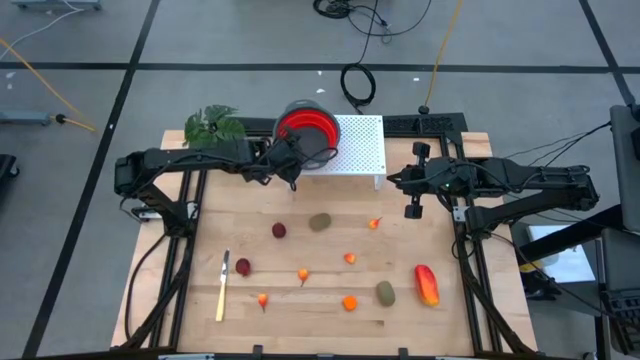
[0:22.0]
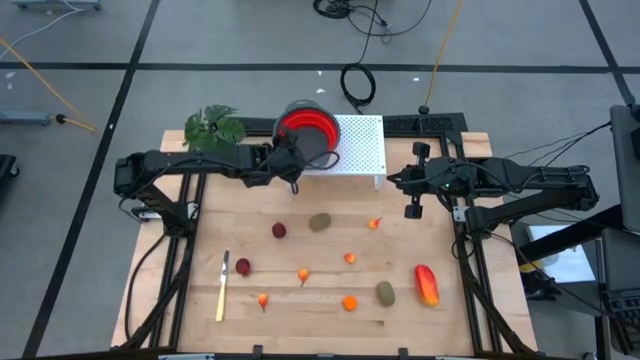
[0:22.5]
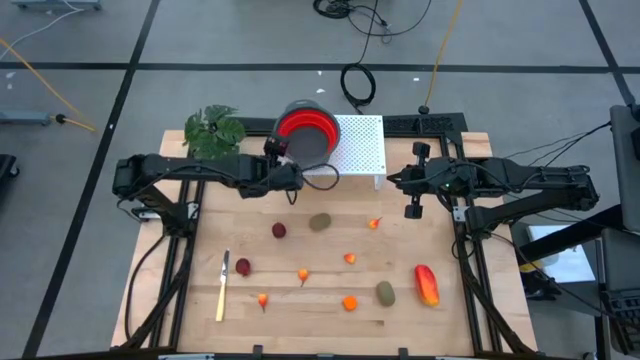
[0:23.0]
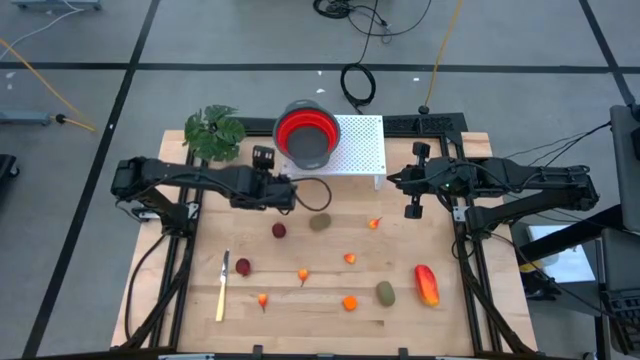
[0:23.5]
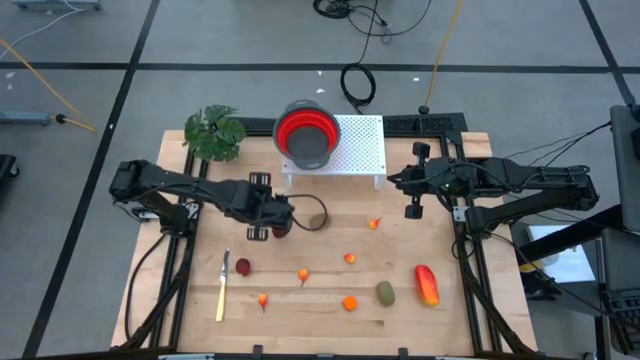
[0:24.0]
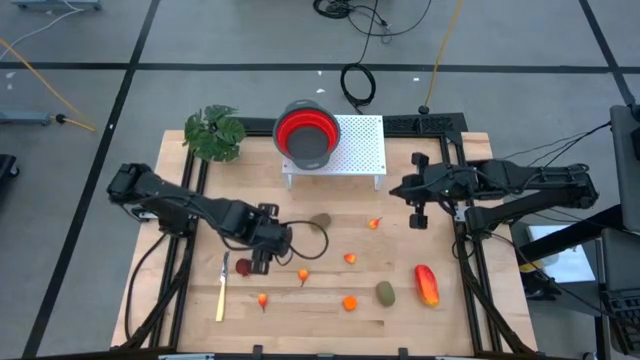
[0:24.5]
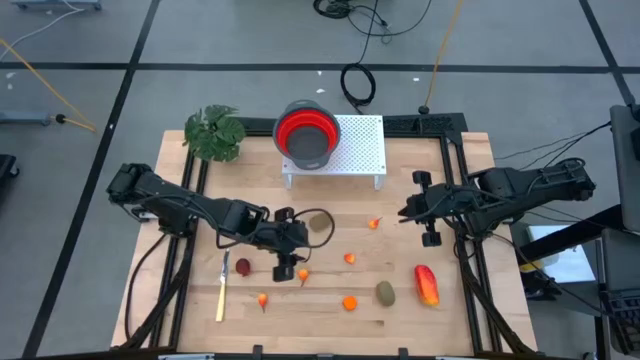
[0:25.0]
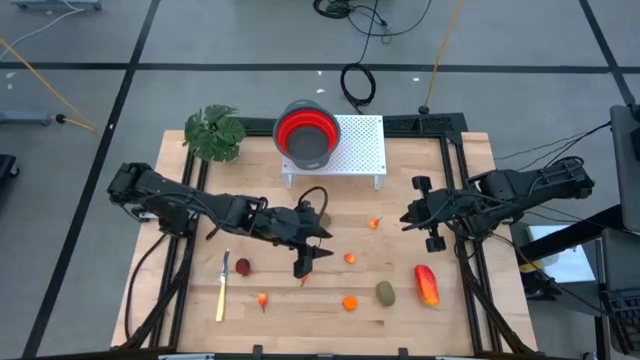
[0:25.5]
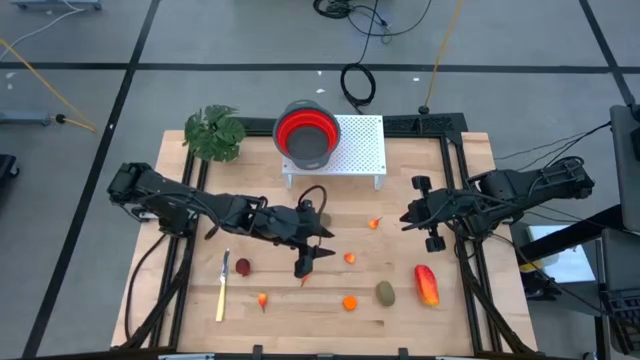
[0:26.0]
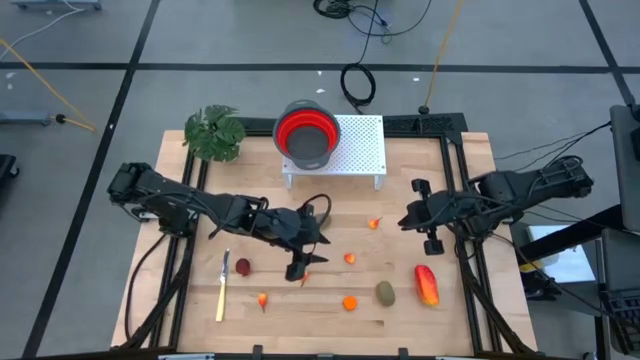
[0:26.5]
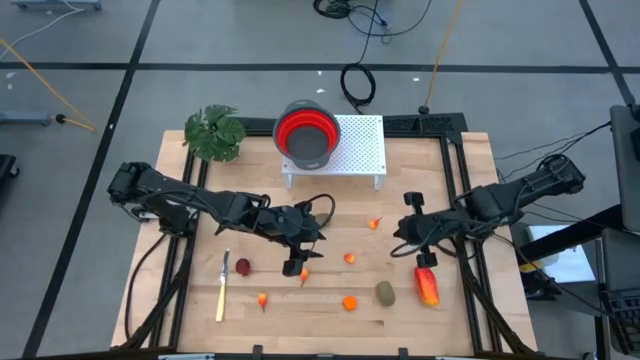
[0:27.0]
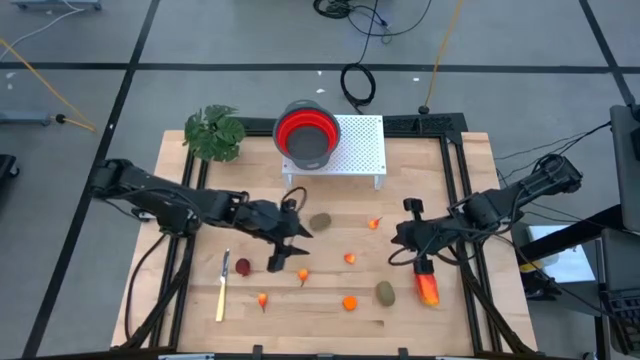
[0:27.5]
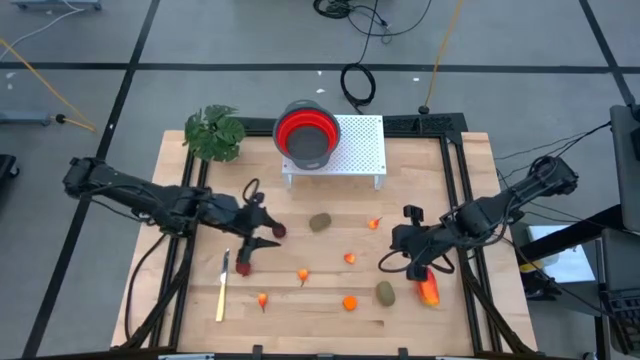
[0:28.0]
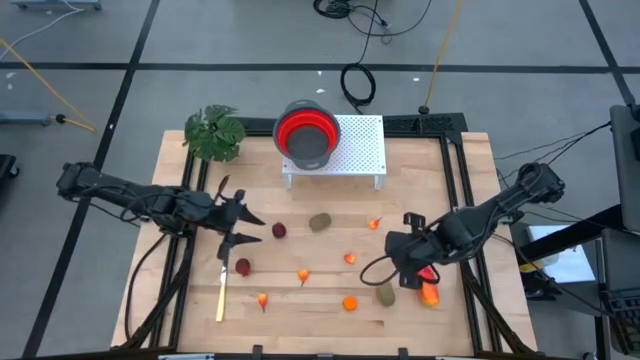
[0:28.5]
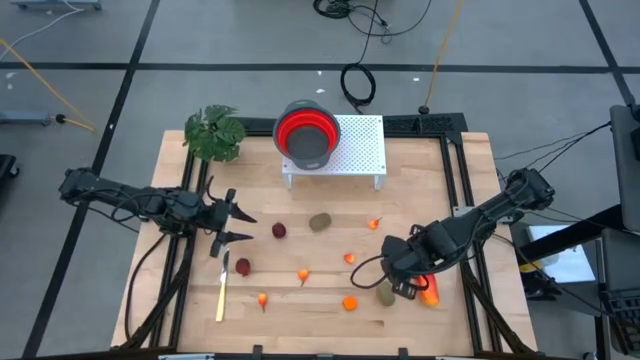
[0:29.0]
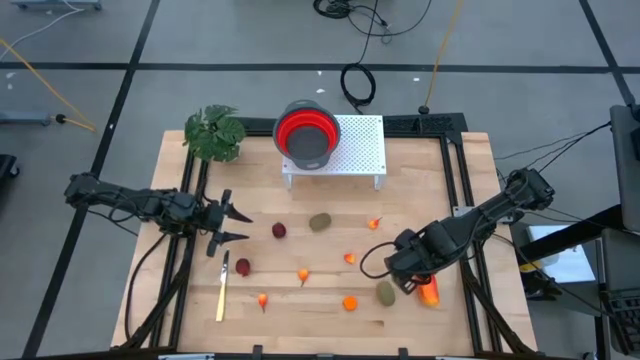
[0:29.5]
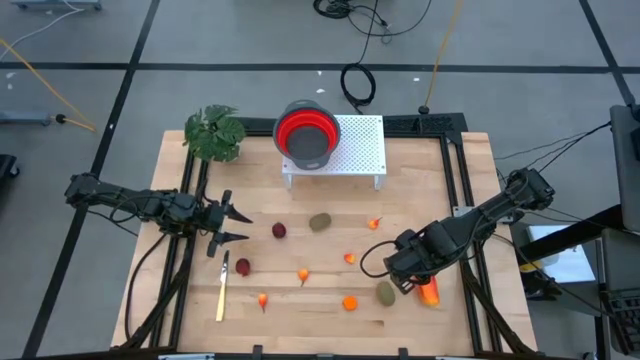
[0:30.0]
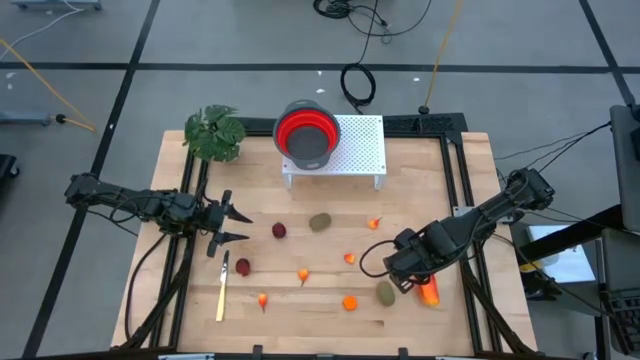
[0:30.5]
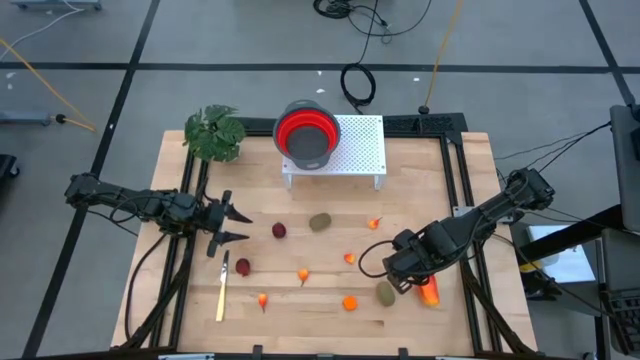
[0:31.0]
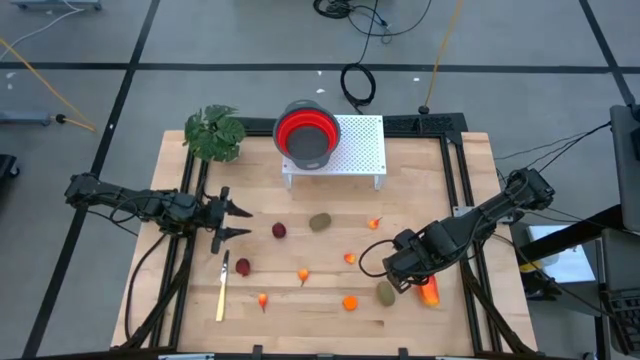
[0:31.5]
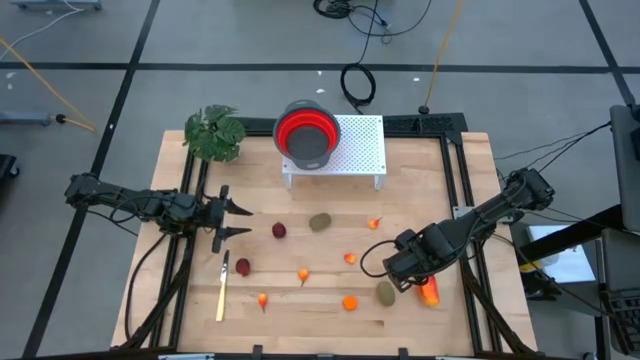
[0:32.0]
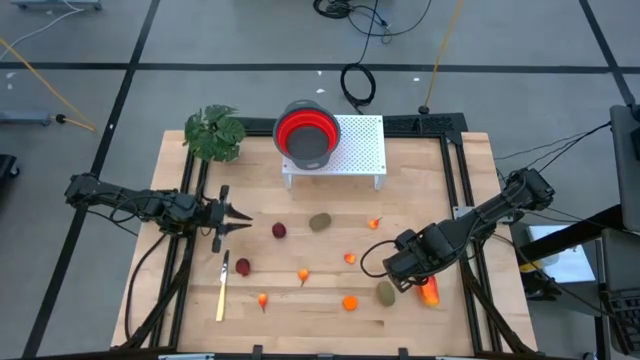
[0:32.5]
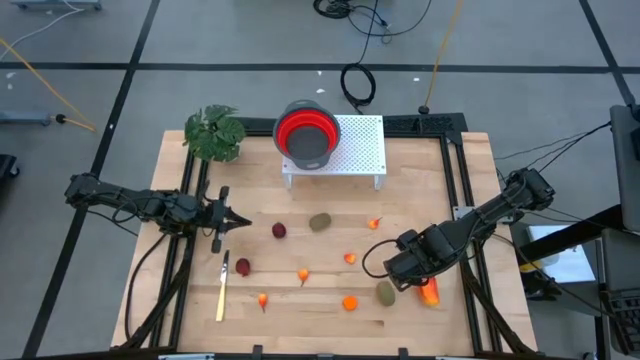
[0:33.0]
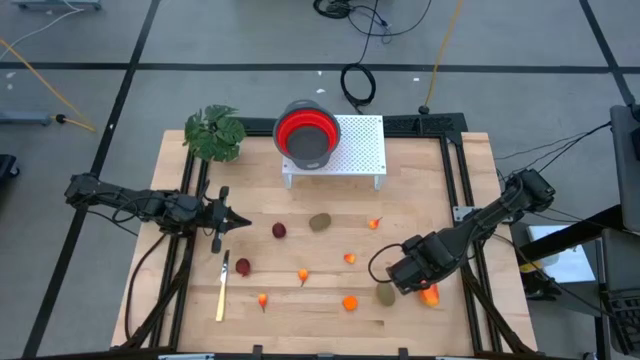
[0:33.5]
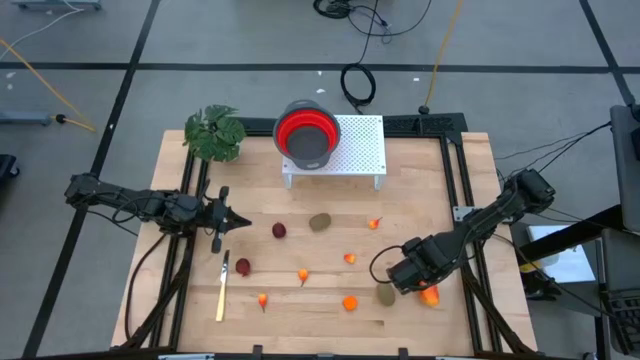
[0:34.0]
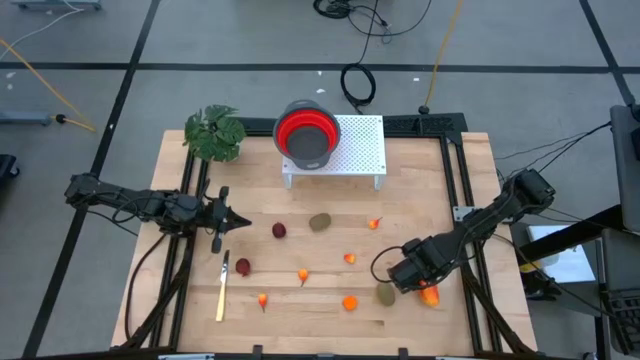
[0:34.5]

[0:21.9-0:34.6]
Task: Pick & Place Fruit
Put the mango into the red strainer bowl on the shelf

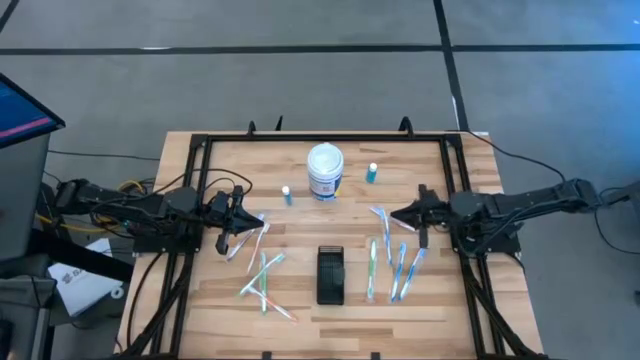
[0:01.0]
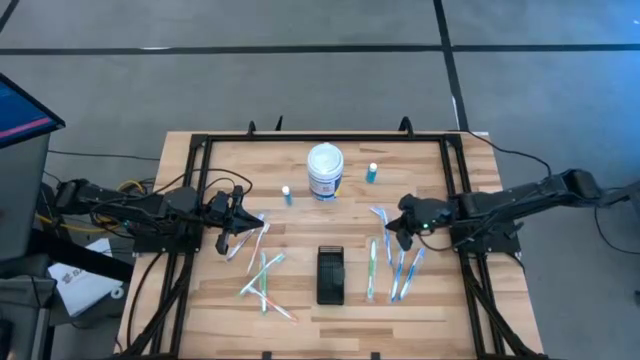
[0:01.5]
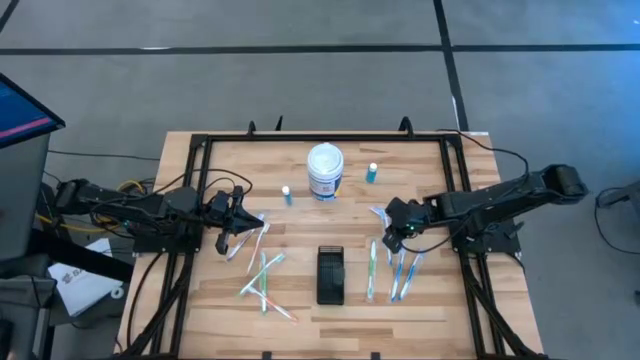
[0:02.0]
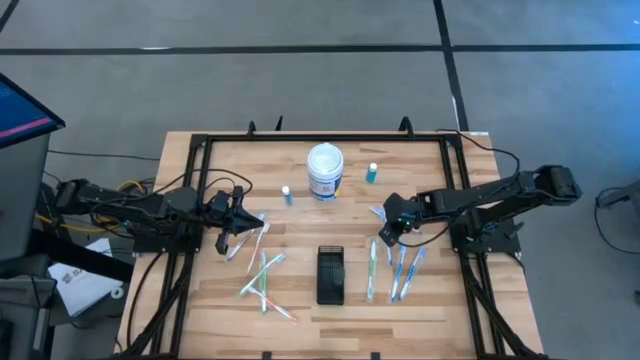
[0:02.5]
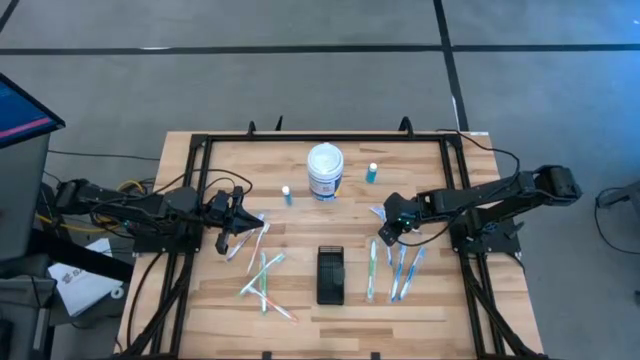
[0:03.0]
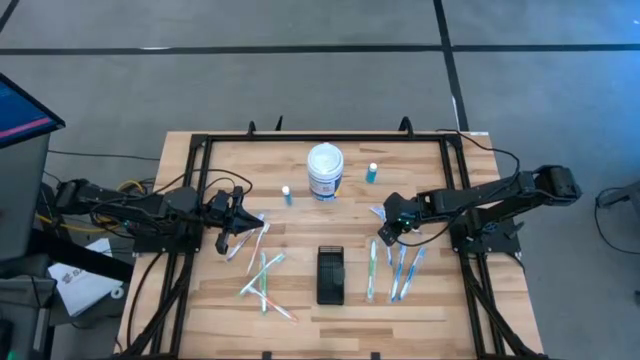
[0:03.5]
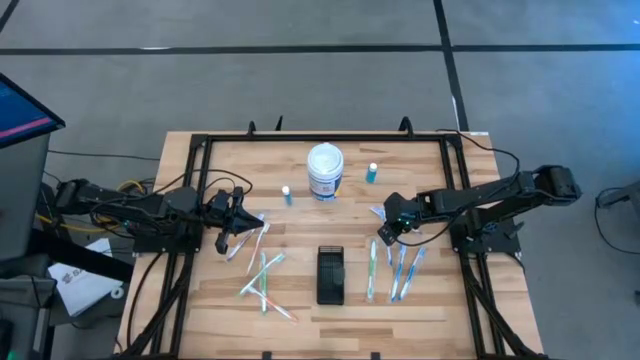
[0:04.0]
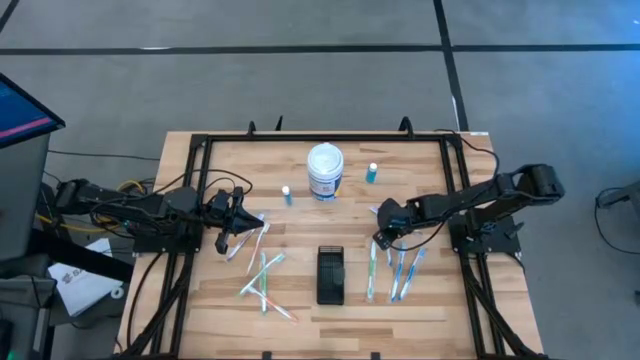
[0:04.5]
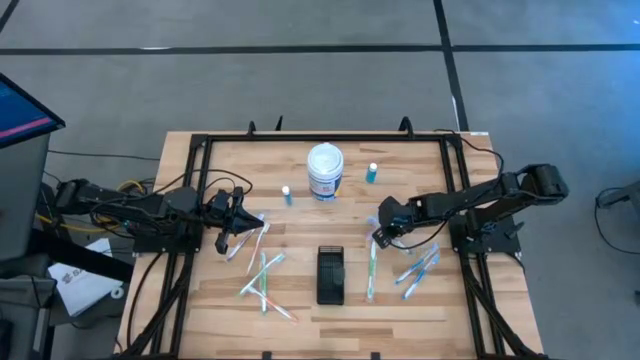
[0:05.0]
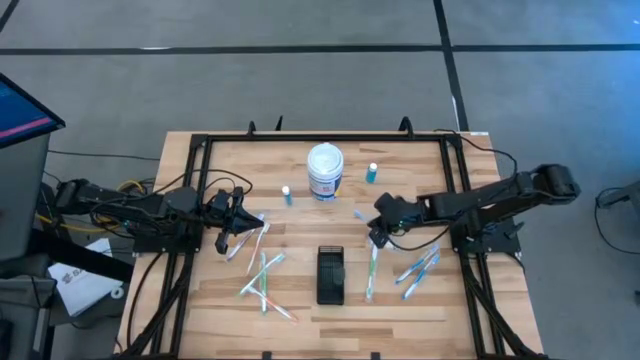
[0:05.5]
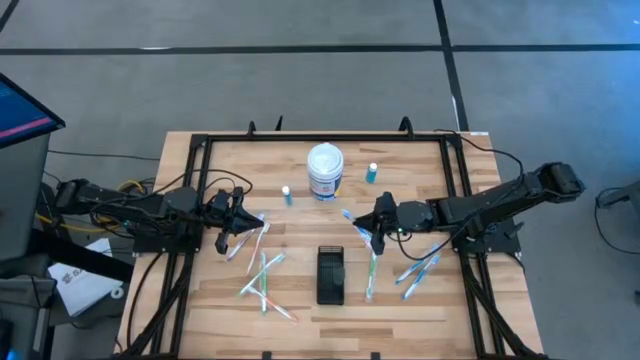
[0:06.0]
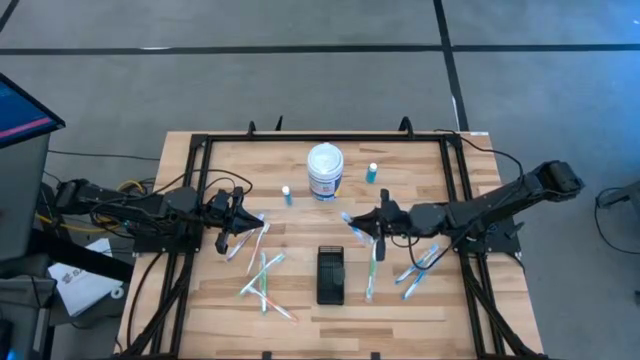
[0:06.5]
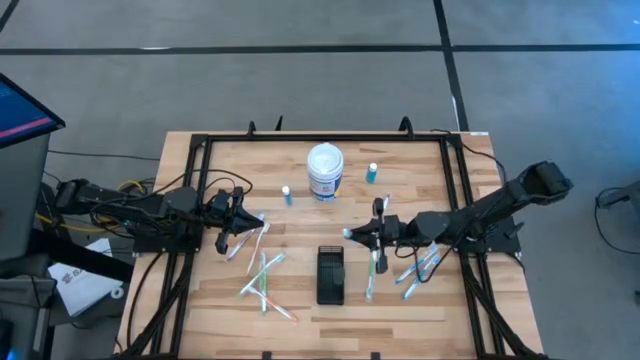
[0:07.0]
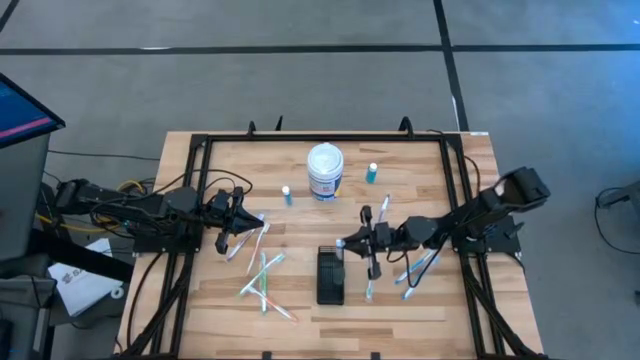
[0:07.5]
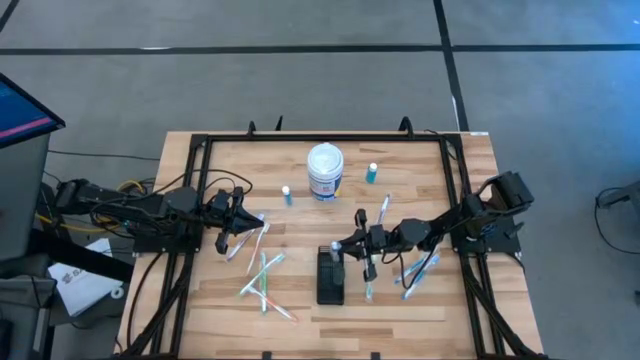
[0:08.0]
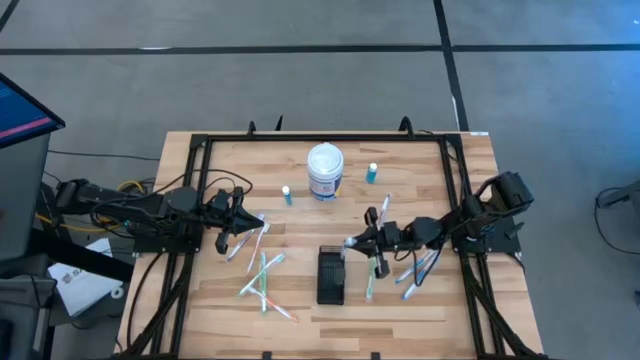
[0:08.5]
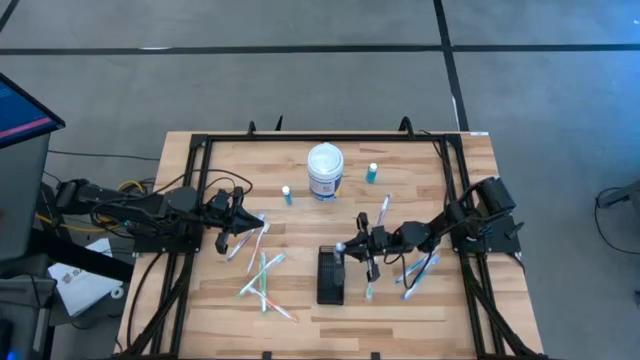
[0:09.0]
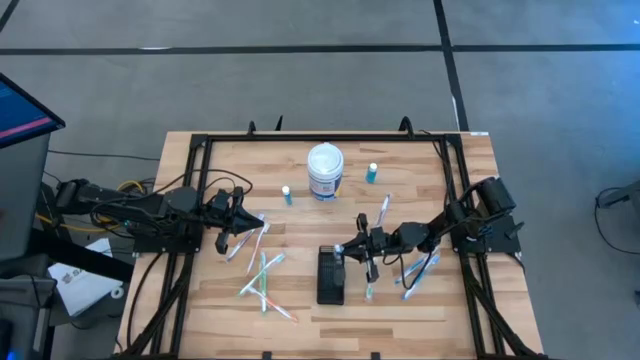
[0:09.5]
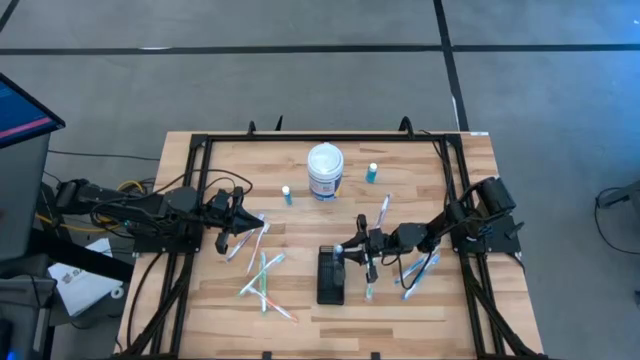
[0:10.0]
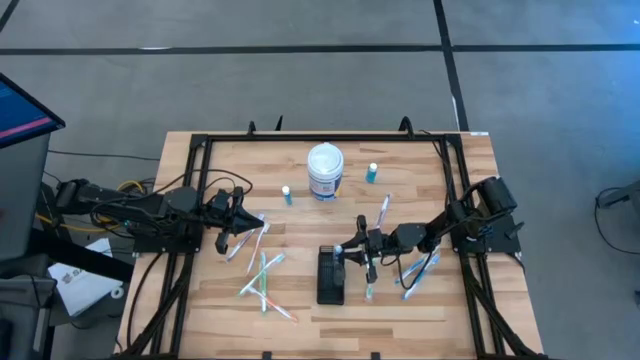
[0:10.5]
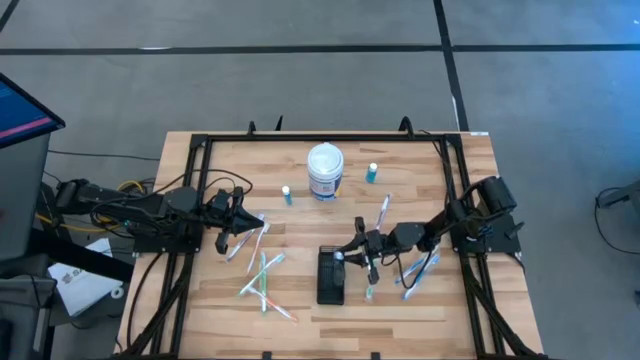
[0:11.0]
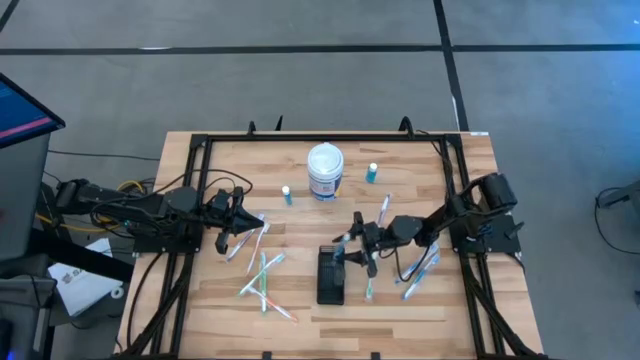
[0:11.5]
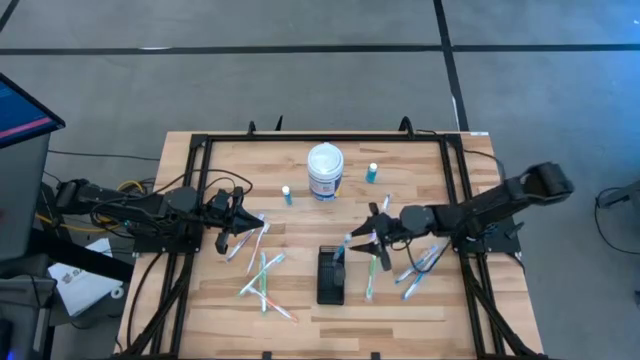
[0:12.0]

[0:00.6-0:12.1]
Task: Pick & Place toothbrushing station
Put the top blue toothbrush into the black mesh organizer
